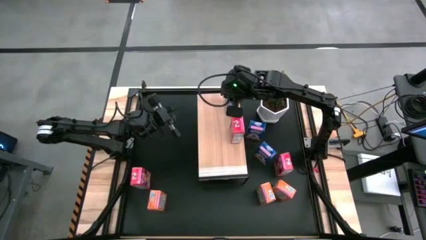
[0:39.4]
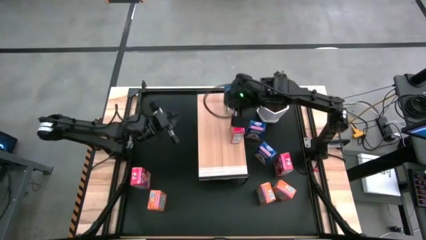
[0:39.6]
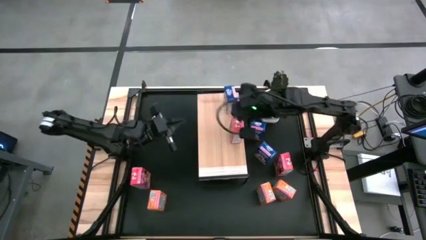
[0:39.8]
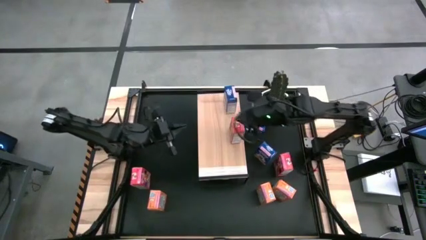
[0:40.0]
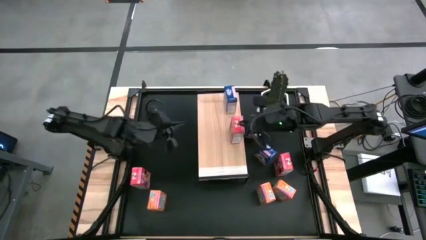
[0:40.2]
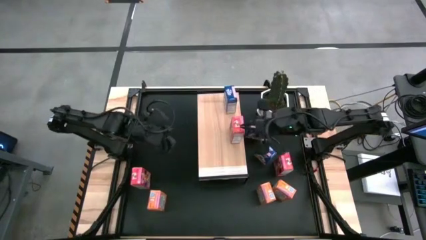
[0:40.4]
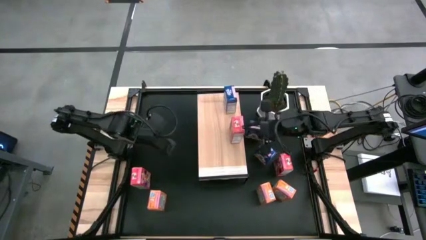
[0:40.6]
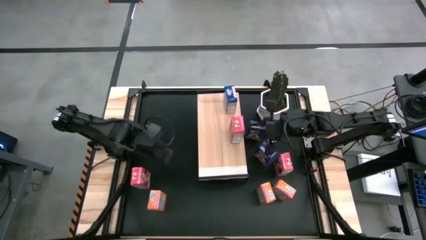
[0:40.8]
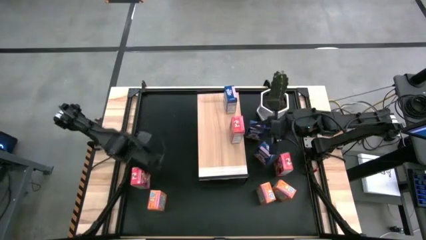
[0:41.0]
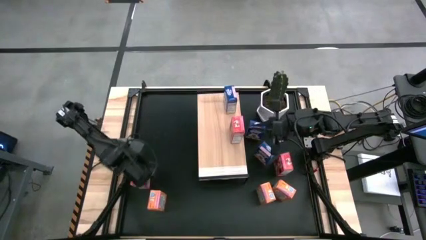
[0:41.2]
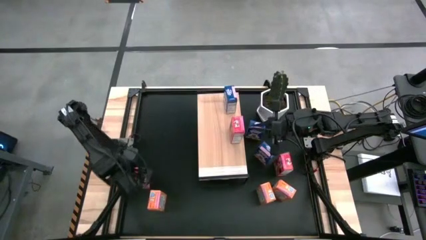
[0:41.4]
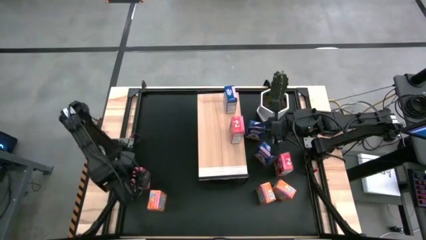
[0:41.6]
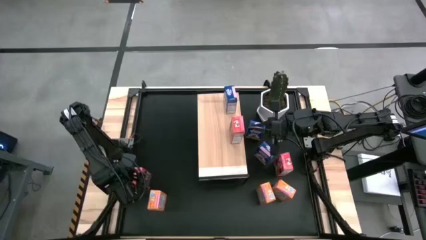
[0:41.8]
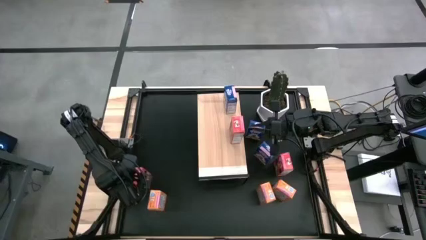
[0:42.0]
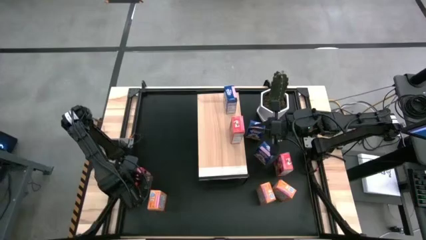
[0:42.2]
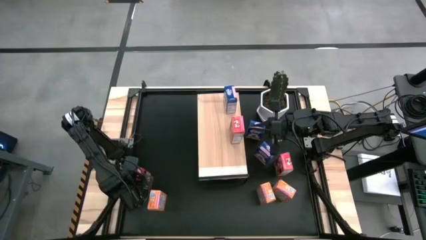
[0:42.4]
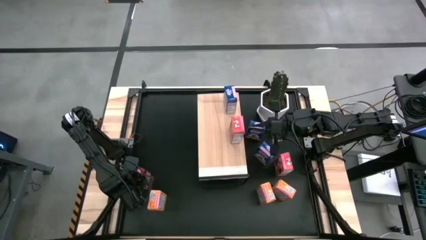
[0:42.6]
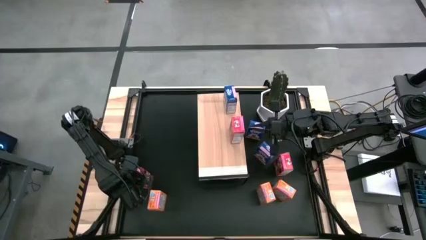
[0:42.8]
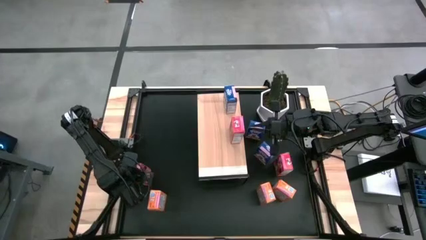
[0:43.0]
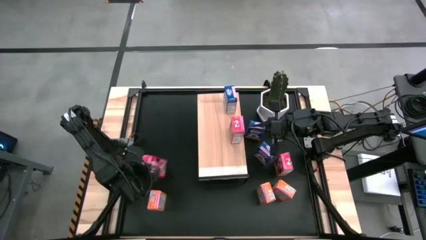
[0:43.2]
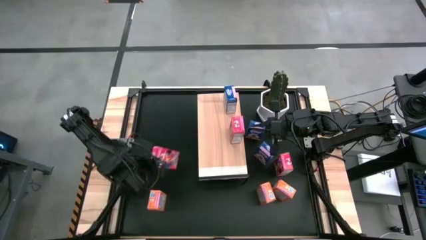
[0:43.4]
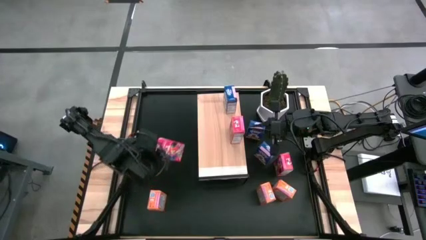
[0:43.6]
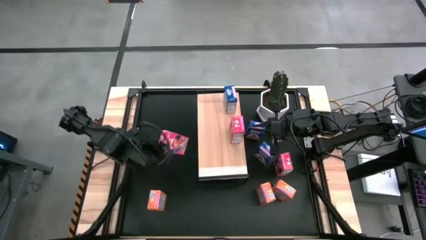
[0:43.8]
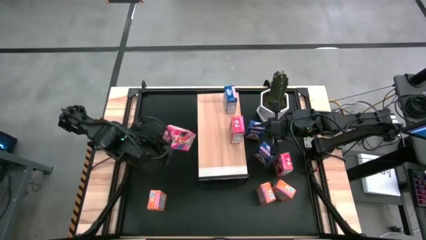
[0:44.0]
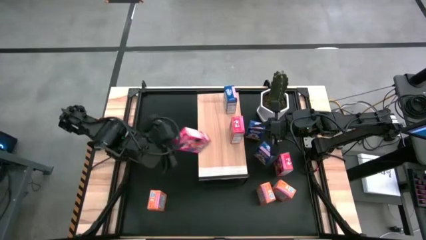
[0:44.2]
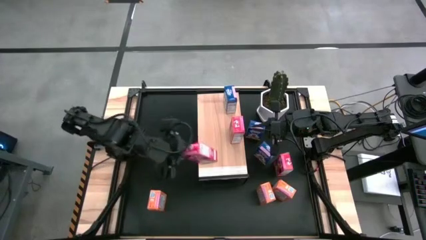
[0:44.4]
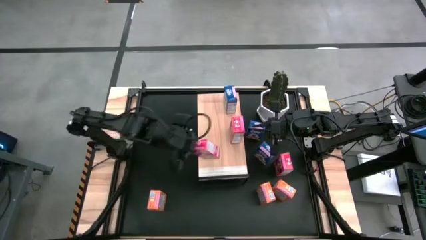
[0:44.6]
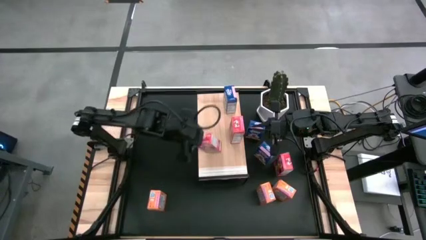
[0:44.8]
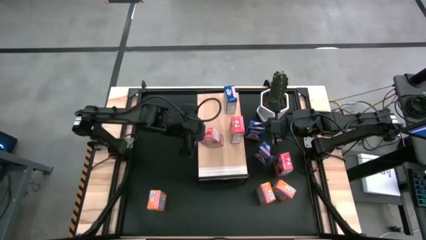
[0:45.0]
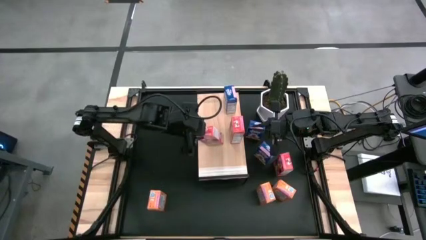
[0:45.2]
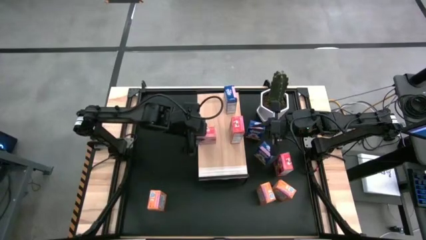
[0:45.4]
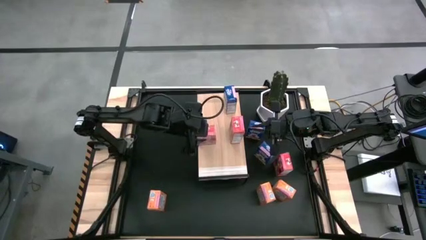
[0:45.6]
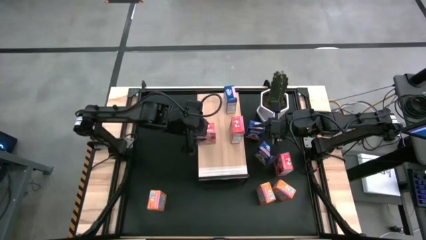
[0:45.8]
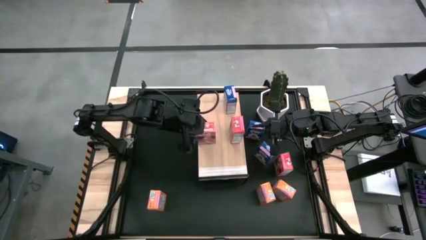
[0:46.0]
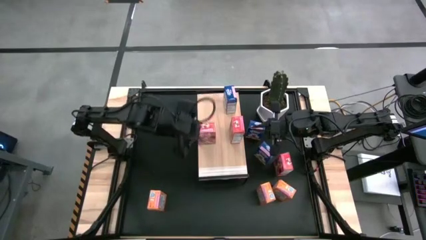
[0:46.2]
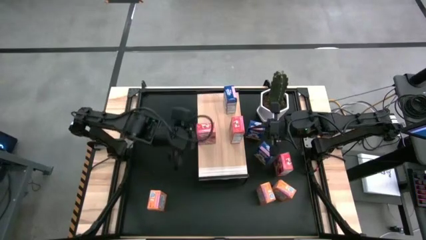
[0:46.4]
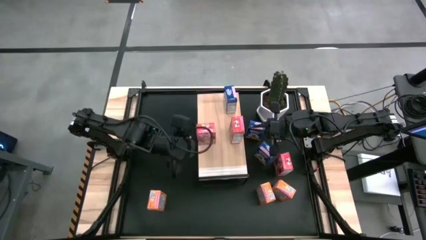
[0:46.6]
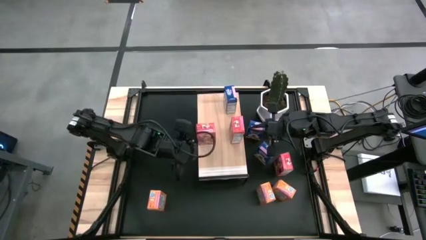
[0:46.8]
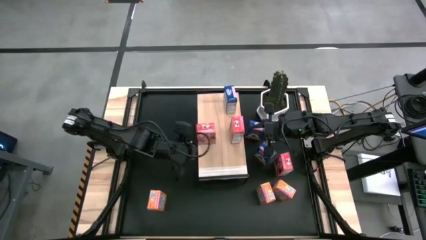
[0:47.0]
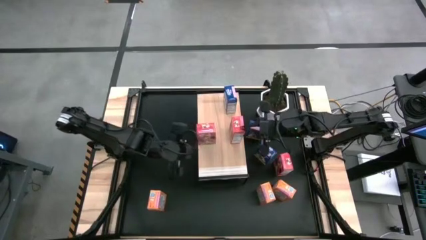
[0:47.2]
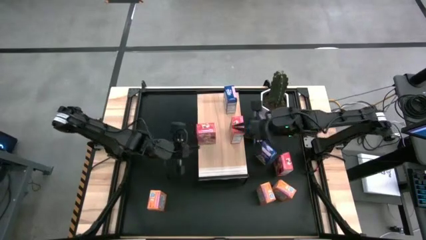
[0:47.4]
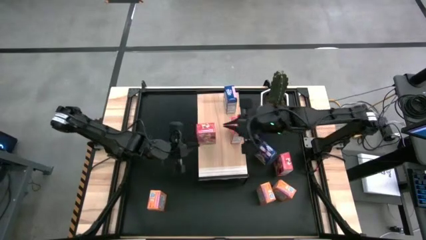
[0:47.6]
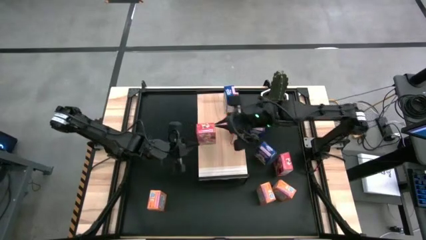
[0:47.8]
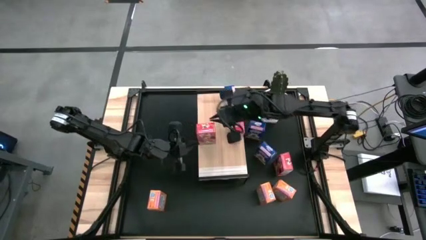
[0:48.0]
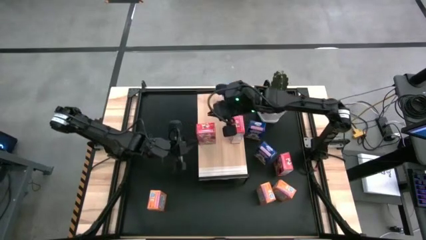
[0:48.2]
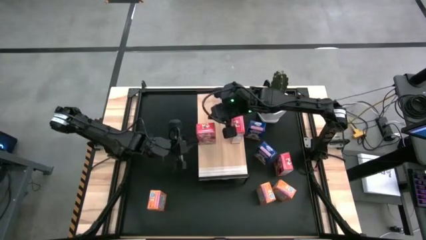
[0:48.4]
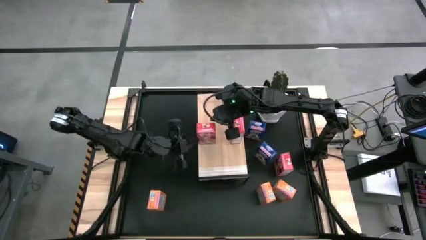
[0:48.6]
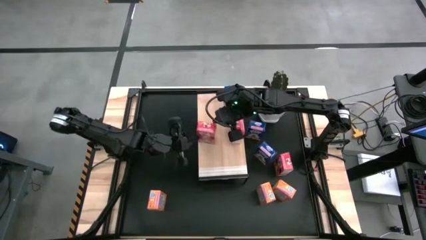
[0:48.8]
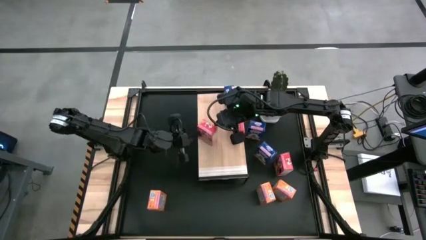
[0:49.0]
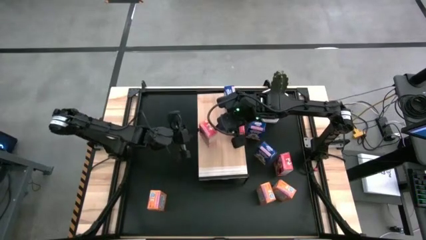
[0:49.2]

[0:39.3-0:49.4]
Task: Stack cereal on shelf
Put the left red cereal box aligned with the other red cereal box on the shelf
